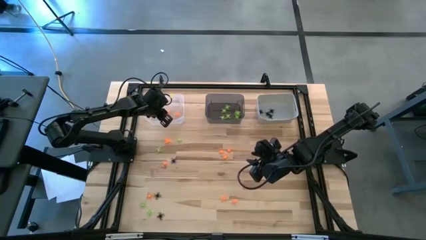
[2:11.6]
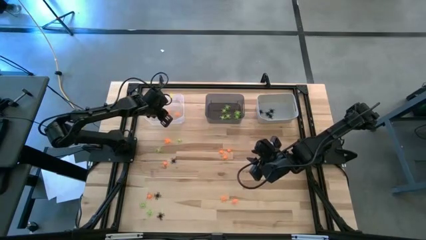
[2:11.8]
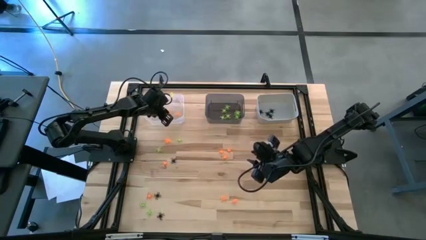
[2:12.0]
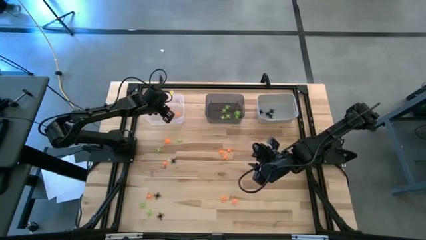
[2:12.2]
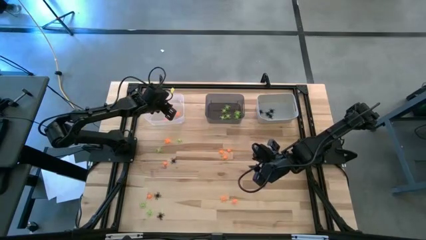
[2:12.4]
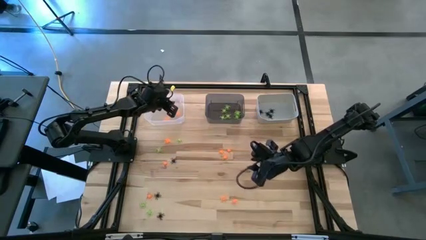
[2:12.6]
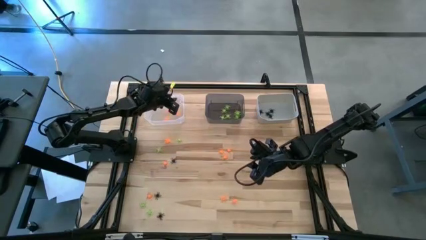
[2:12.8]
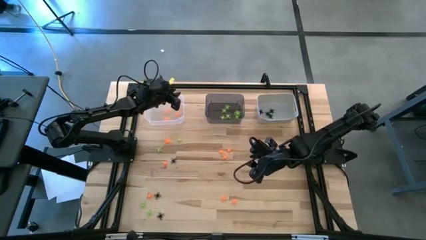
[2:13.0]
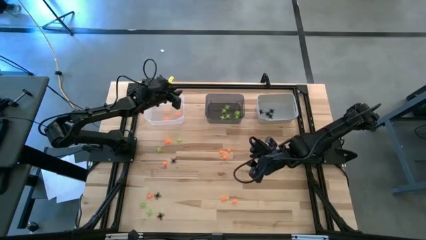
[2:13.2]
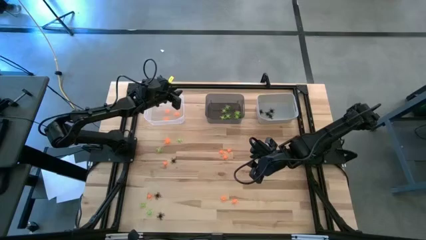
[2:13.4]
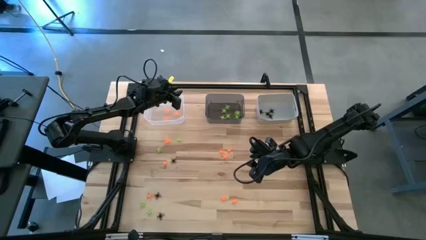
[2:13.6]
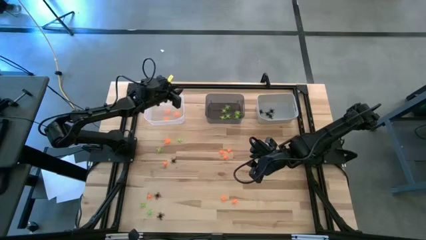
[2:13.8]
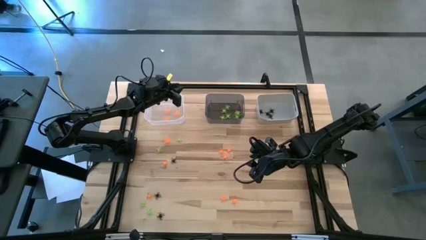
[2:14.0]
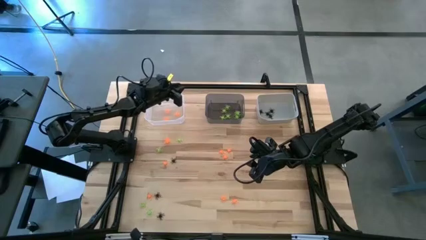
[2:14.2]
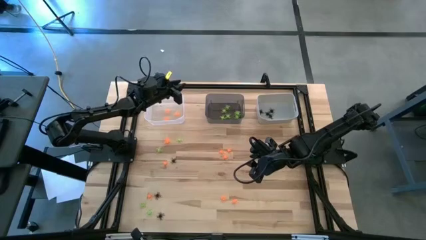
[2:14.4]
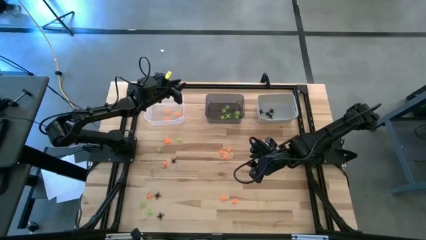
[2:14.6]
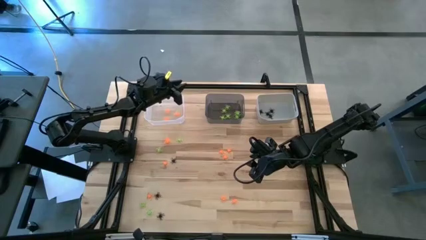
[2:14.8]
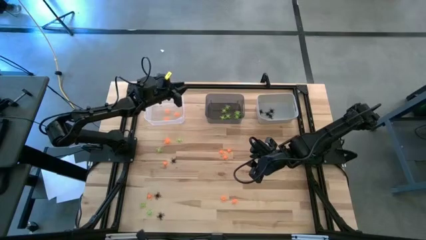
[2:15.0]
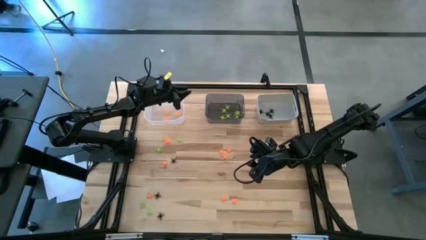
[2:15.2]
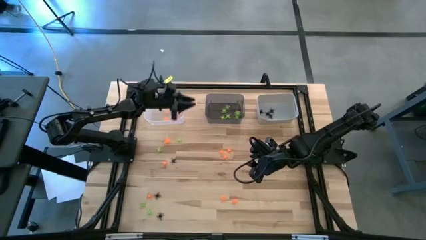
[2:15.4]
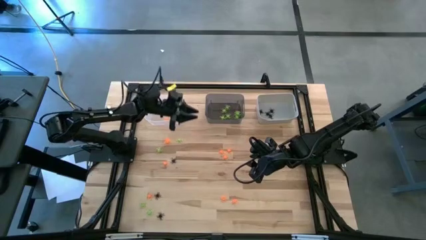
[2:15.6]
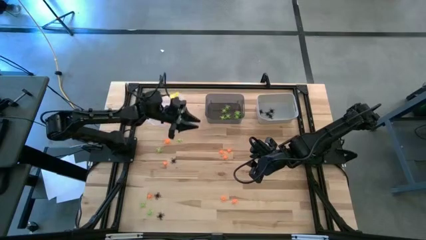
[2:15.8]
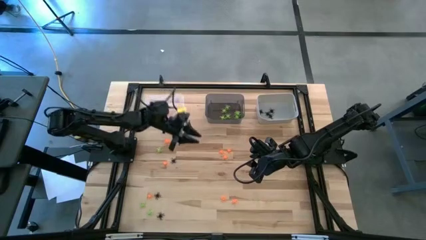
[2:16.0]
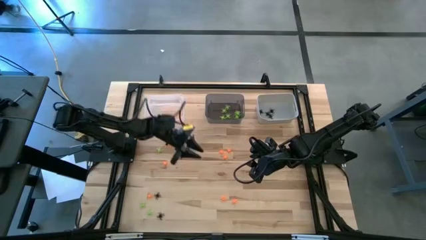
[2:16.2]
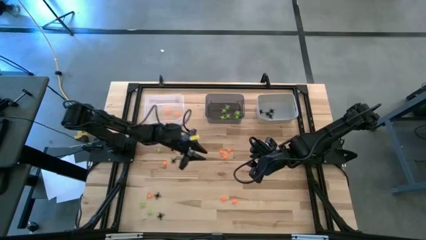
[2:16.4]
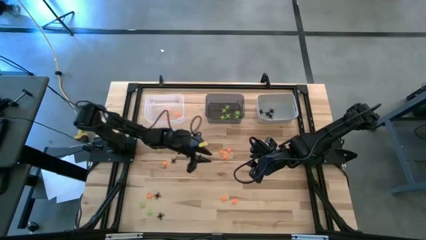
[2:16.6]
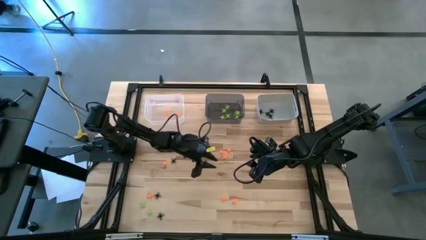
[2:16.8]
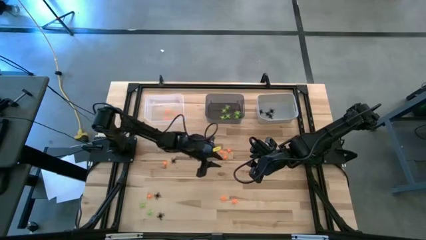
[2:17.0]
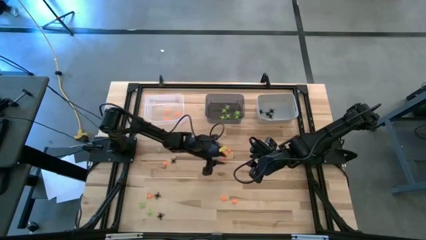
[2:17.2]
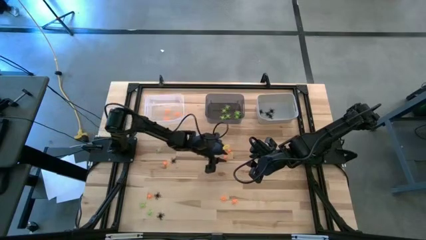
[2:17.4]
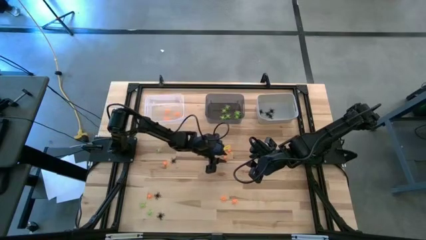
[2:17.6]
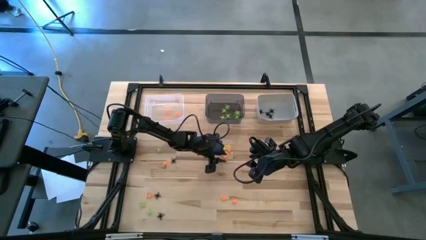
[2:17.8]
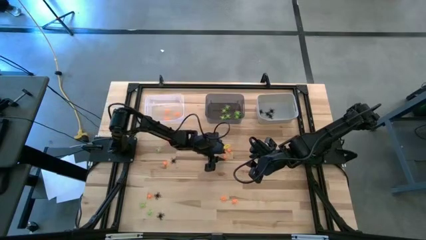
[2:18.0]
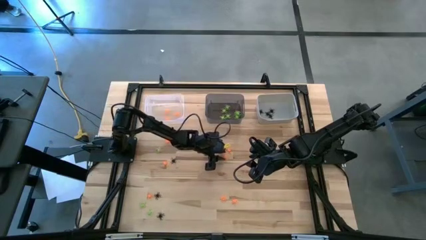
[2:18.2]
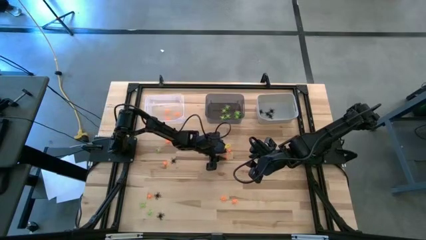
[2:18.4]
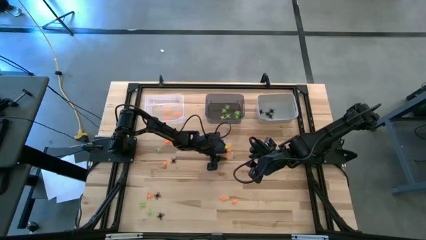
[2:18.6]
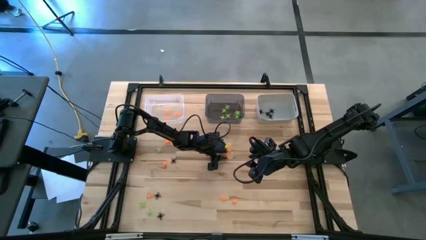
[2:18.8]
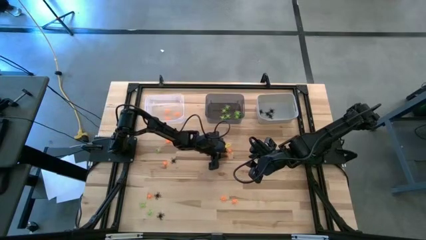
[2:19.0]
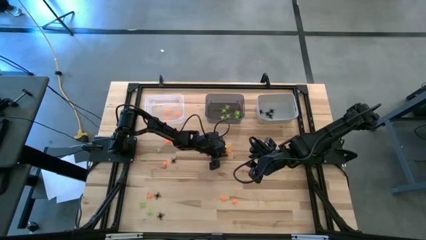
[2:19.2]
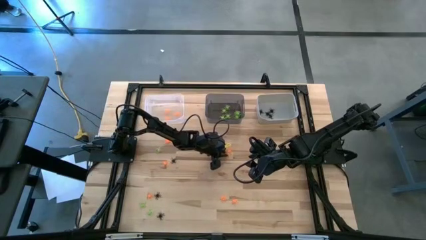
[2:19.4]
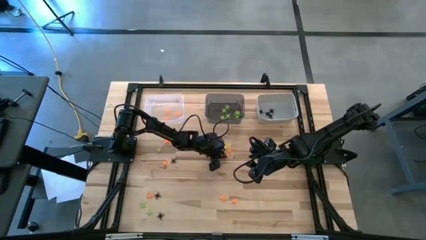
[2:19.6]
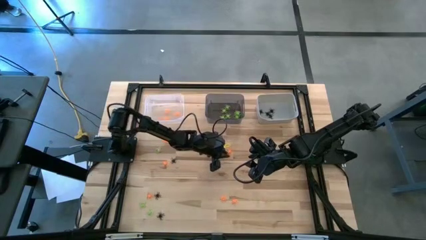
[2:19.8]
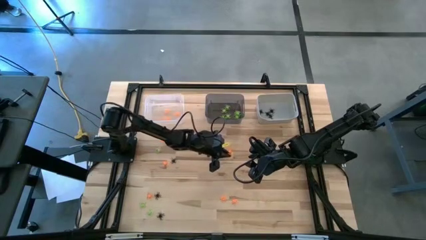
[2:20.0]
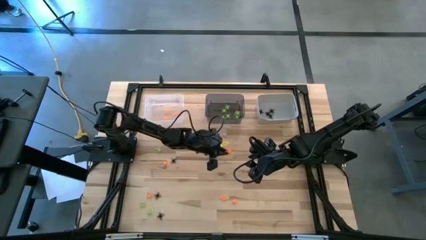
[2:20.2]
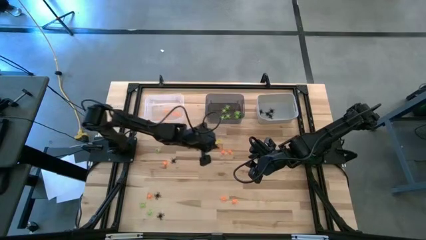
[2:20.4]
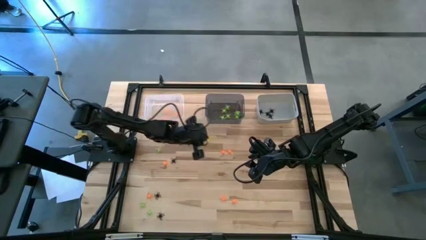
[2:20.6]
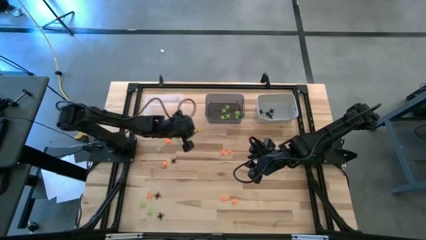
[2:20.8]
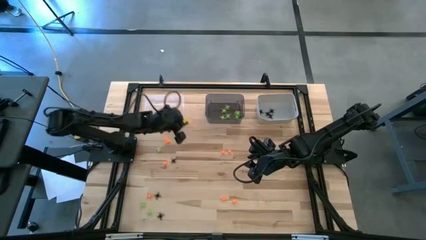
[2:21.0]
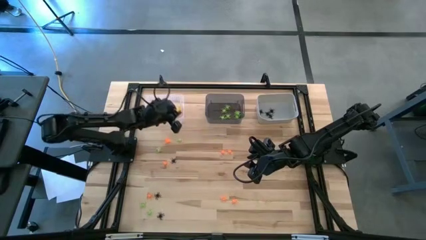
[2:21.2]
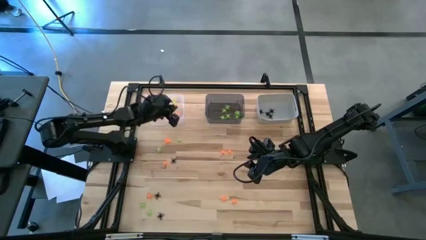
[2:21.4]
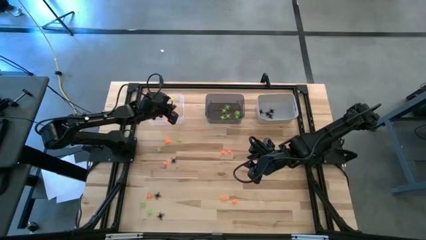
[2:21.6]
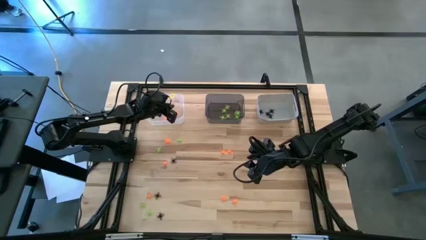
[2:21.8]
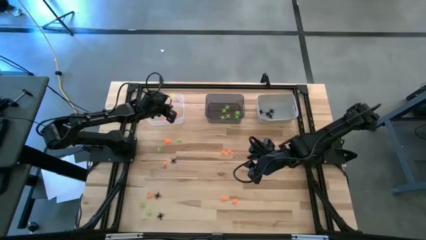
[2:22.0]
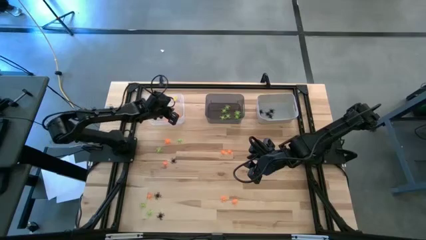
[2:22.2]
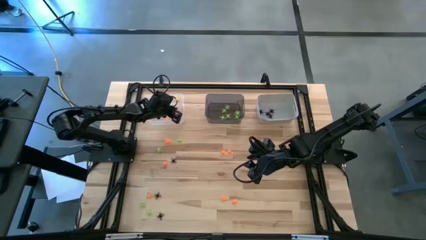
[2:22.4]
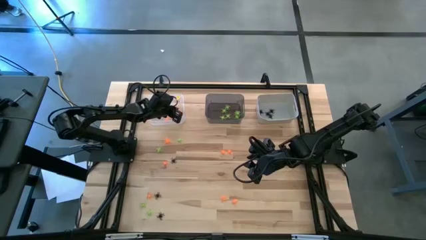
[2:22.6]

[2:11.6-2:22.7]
Task: Sort Halloween decoration
Put the orange spider toy into the transparent bin

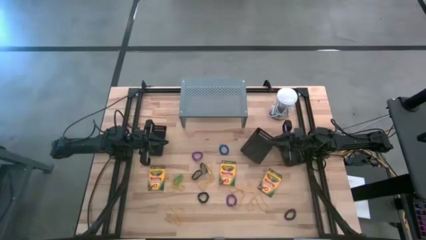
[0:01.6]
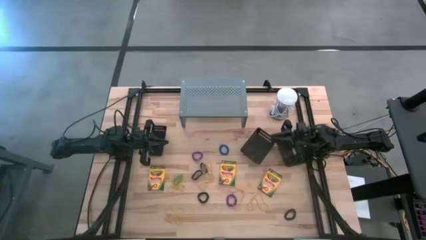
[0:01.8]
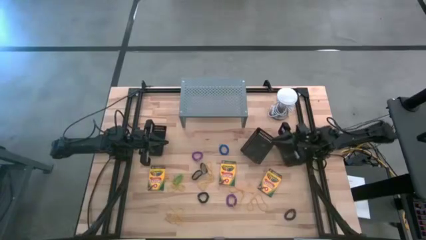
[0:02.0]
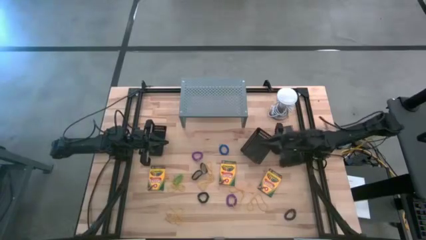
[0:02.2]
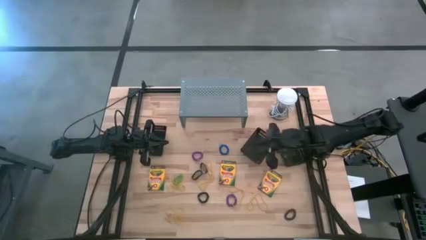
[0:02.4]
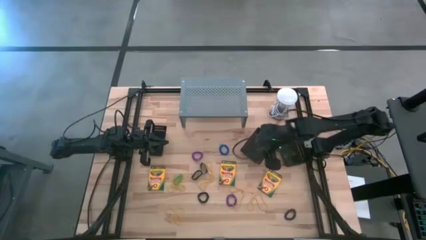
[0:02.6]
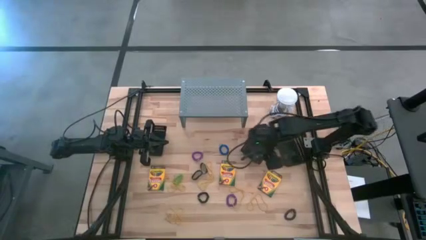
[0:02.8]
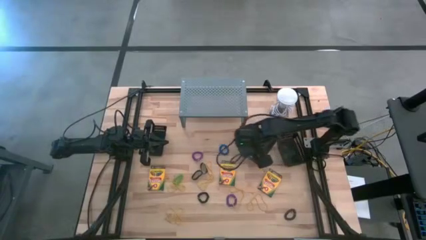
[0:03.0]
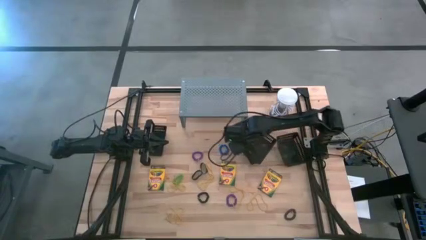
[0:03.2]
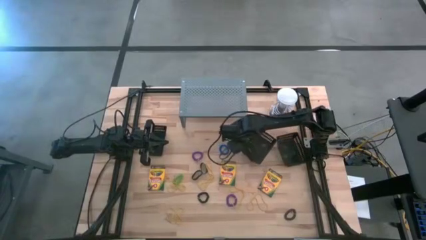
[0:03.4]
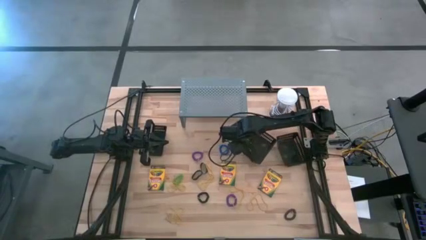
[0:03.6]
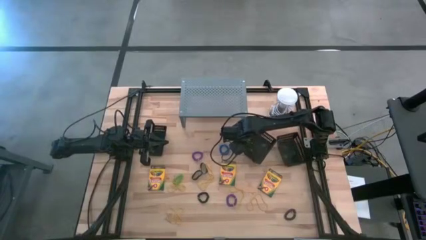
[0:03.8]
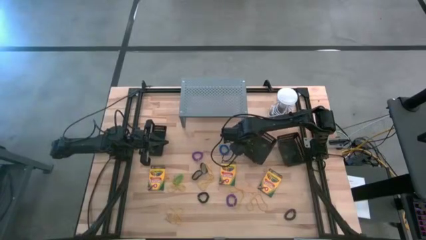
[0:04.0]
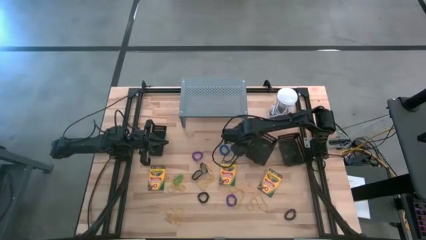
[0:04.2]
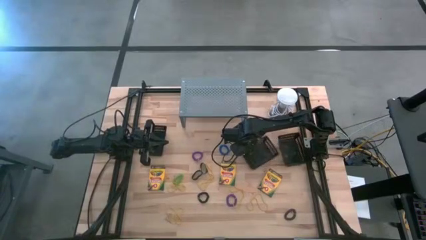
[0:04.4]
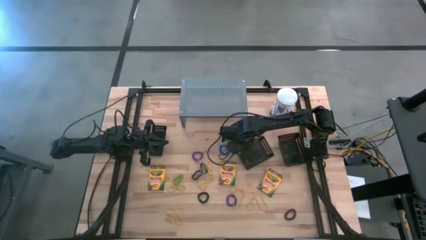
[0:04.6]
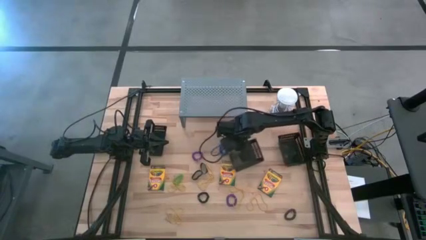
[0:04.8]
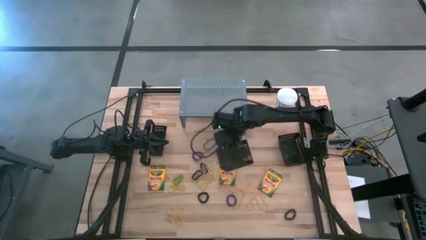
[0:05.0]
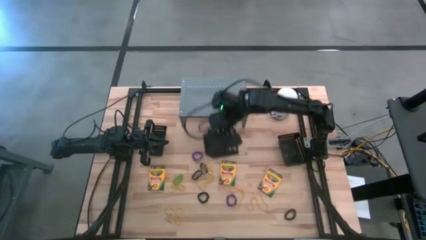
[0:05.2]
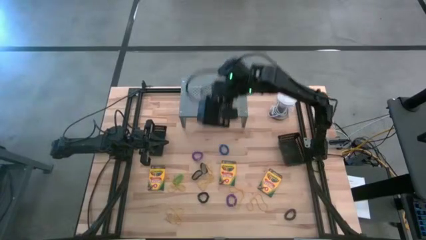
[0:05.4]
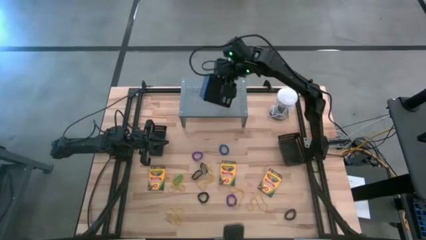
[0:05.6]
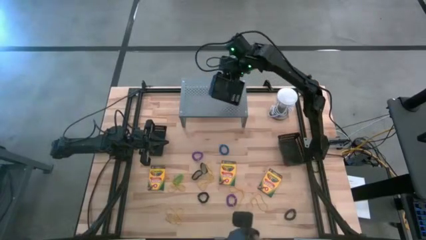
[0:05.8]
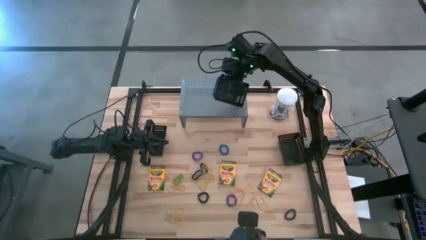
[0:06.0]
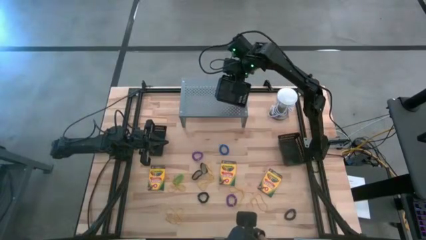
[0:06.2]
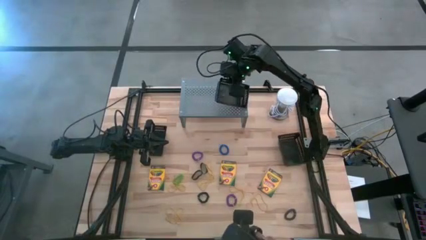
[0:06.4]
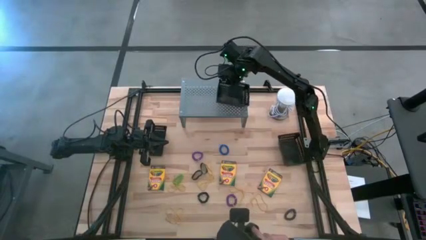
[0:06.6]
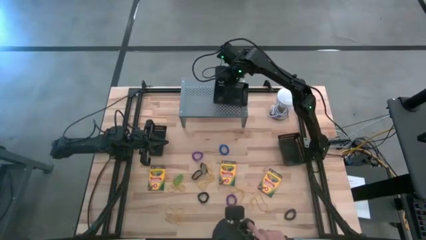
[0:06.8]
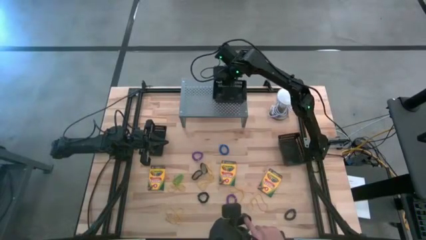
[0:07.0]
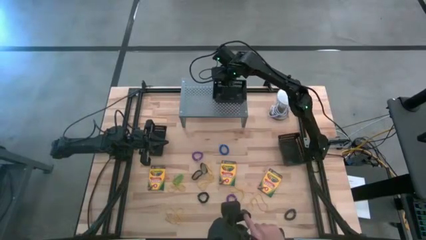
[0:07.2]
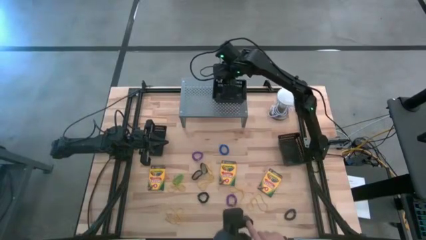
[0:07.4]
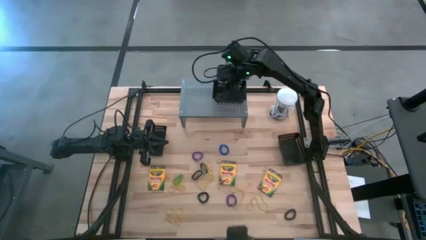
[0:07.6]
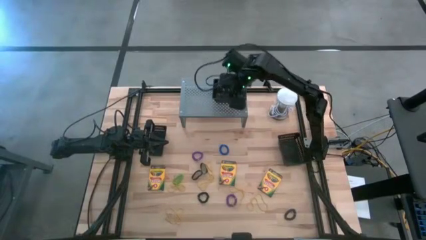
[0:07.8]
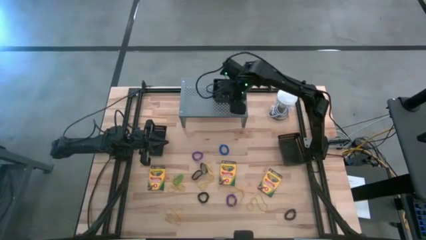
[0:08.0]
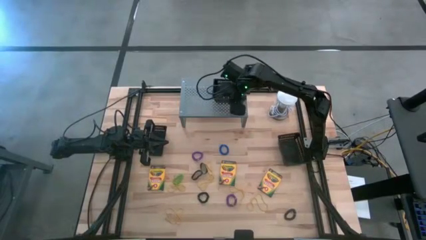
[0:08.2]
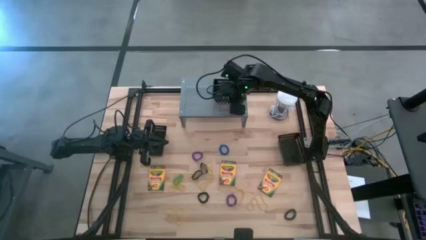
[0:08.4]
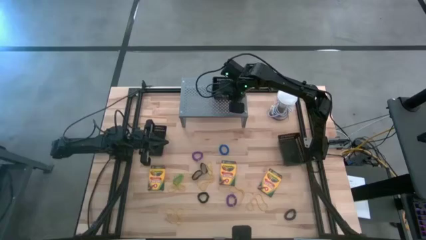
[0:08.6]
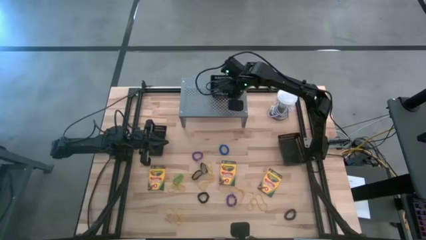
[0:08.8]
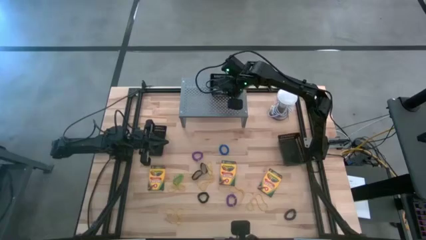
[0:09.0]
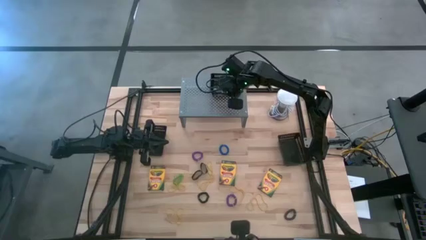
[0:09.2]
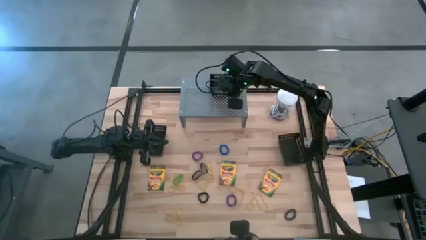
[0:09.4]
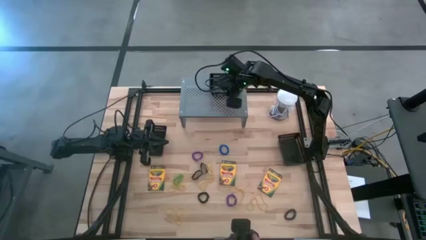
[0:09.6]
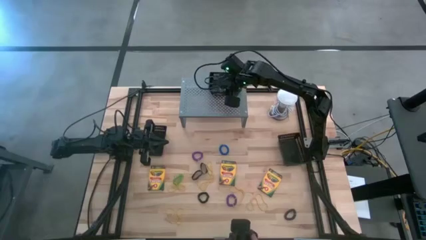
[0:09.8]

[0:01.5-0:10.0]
Task: Pick & Place Office Desk Supplies
Put the middle black bin on the shelf
